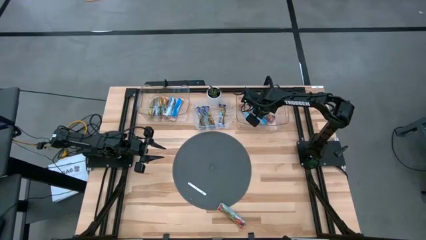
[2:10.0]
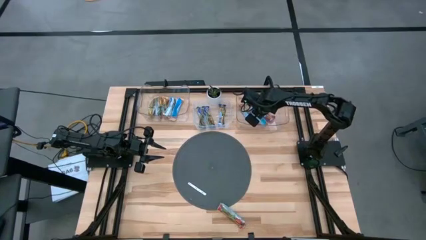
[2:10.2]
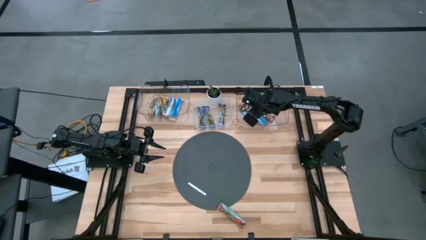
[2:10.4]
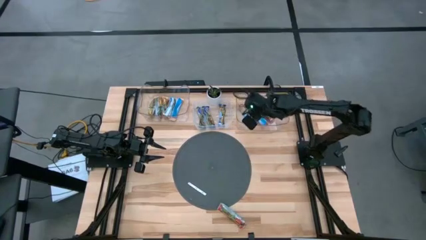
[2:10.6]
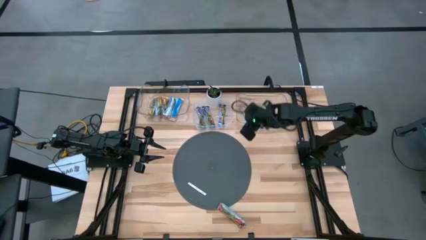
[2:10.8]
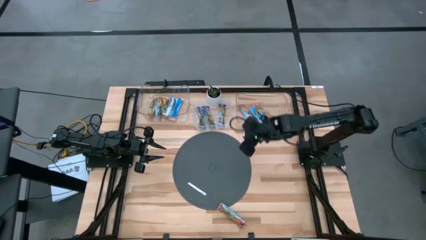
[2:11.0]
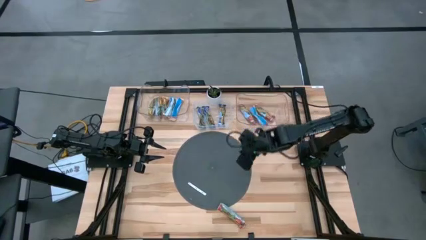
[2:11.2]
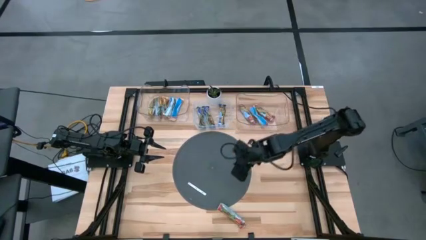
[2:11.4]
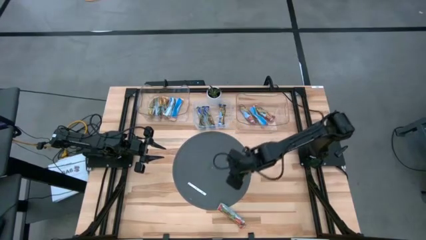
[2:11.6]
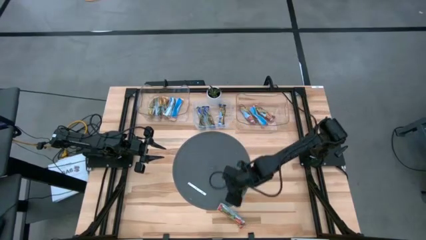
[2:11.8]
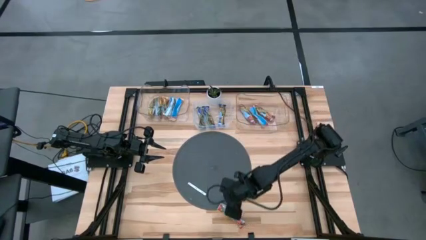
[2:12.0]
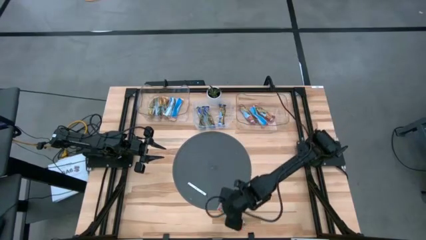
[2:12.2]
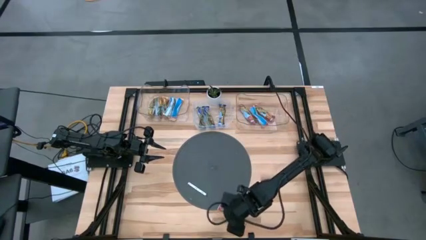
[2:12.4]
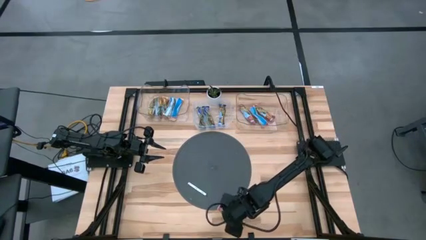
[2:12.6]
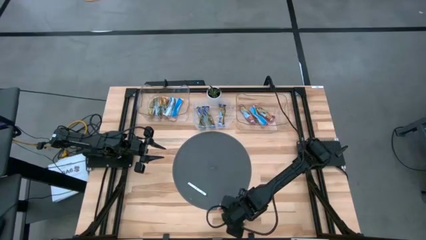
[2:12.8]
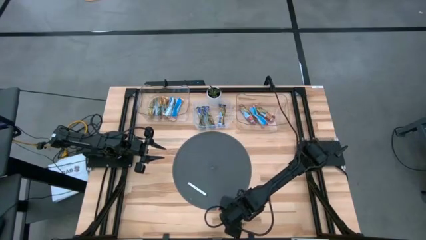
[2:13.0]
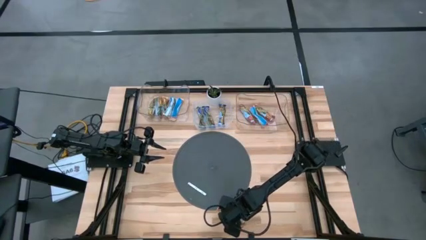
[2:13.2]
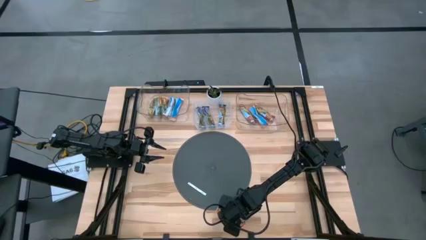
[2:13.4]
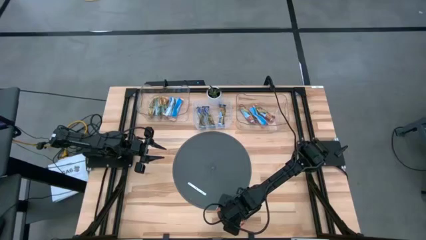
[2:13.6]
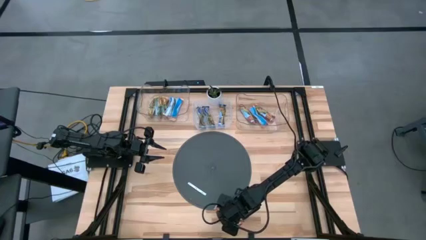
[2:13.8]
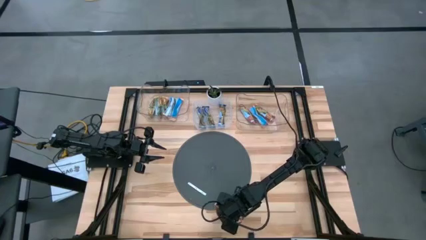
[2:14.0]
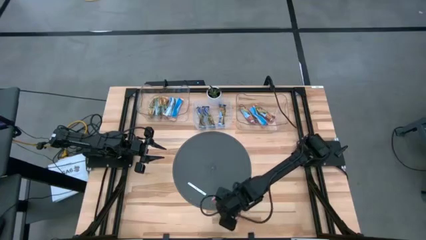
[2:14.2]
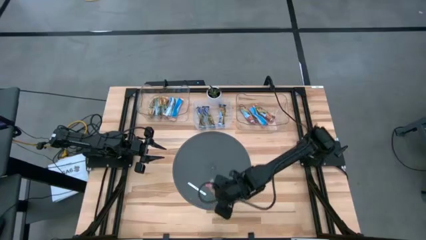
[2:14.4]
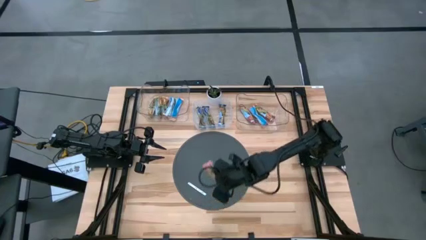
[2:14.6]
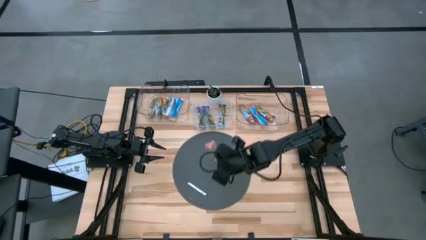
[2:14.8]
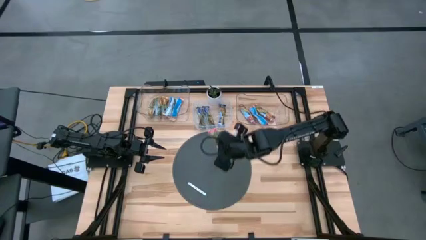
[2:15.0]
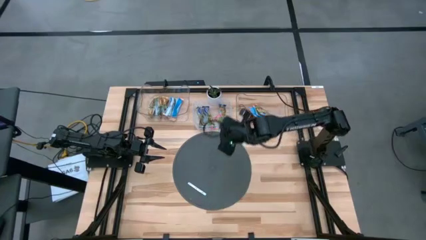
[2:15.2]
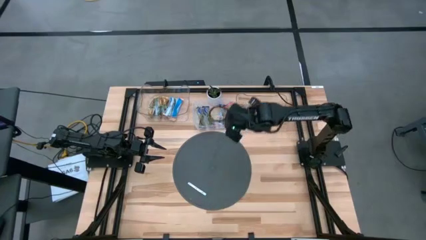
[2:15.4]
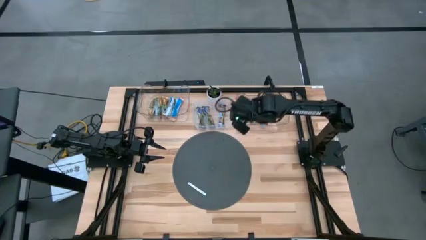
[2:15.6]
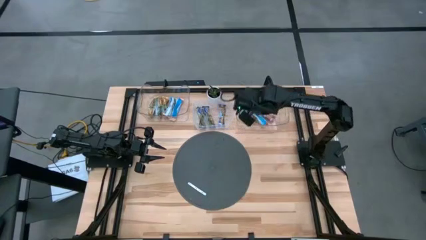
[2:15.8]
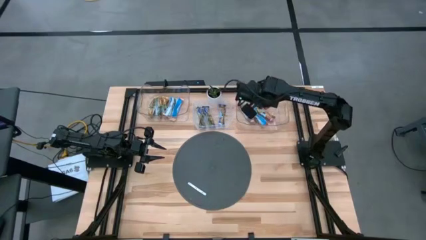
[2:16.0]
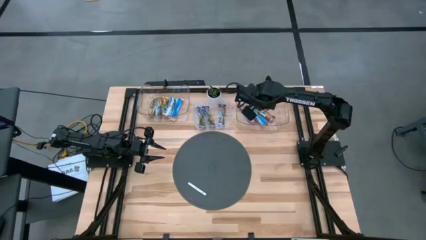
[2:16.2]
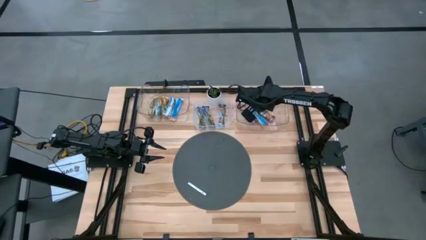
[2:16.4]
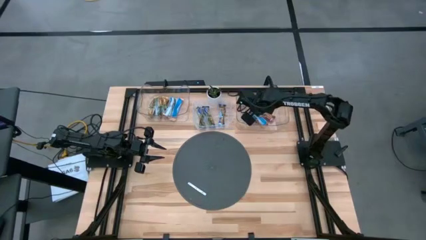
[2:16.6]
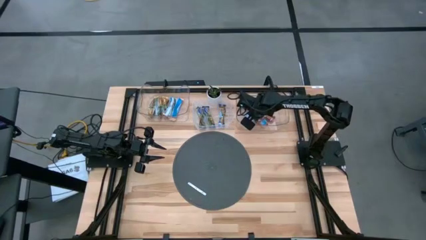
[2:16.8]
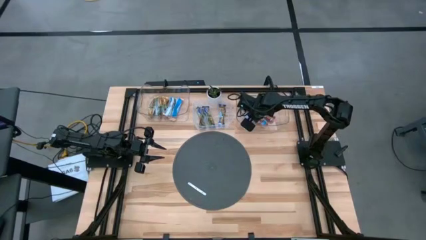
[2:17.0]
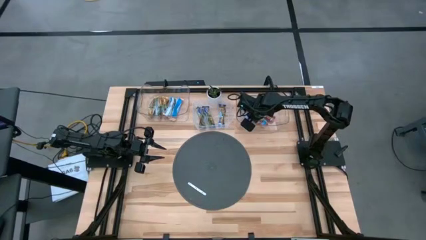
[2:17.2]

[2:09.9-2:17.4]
Task: Pick and place Granola Bars by type
Put the red granola bar into the right transparent bin

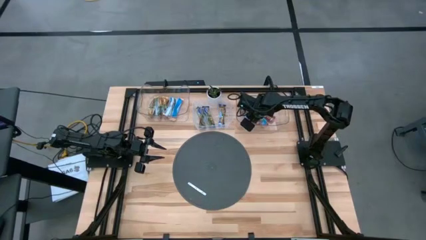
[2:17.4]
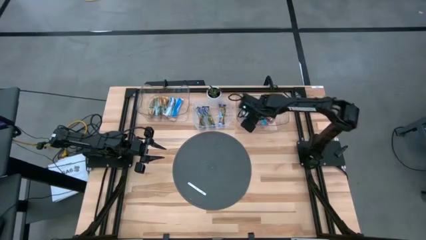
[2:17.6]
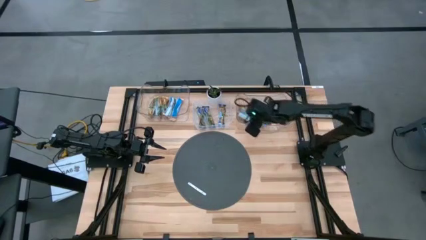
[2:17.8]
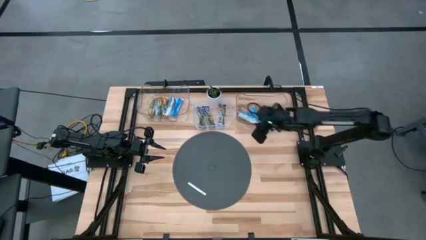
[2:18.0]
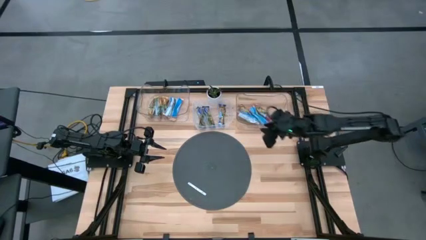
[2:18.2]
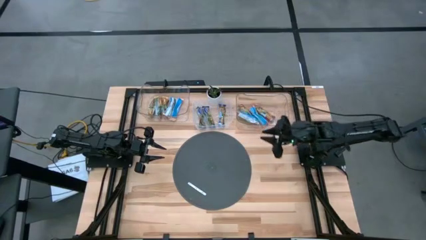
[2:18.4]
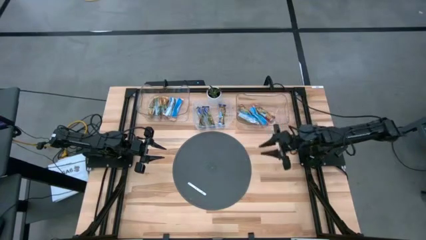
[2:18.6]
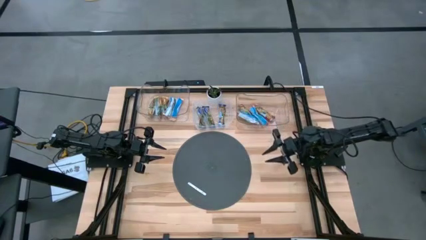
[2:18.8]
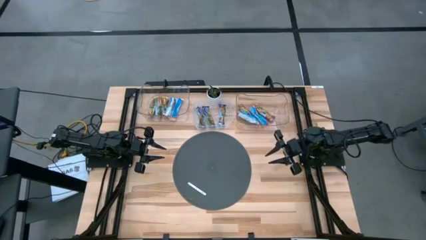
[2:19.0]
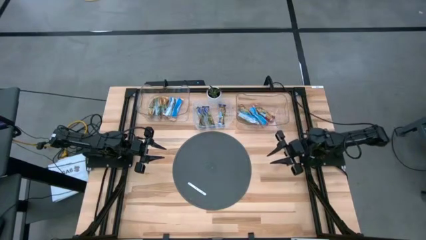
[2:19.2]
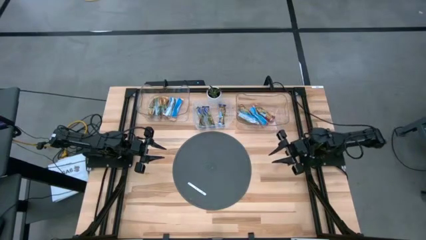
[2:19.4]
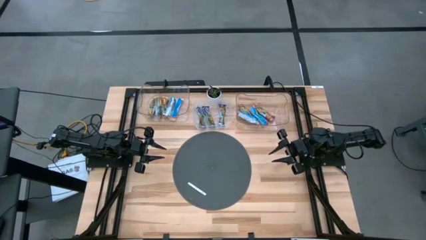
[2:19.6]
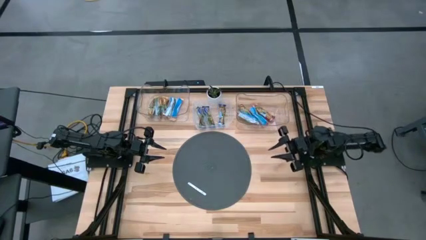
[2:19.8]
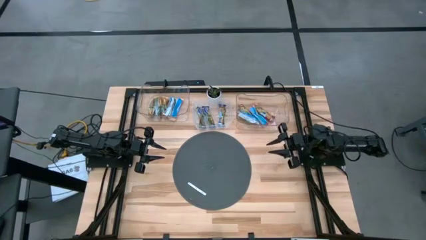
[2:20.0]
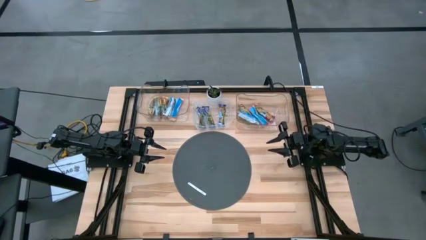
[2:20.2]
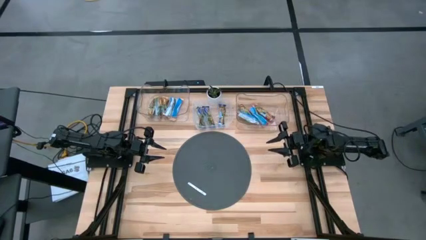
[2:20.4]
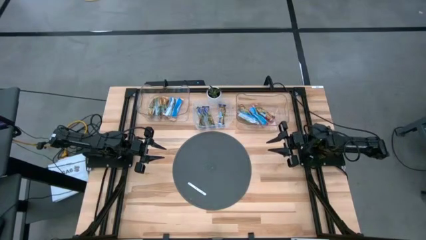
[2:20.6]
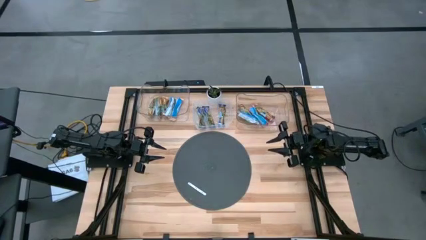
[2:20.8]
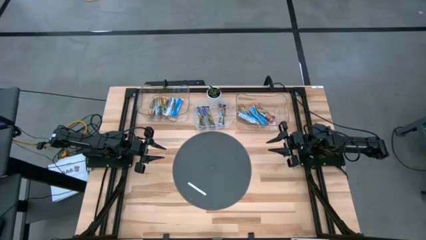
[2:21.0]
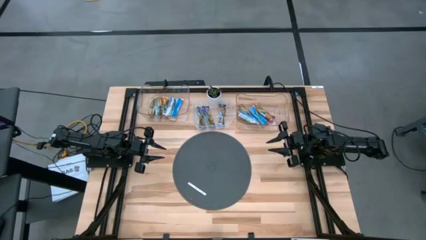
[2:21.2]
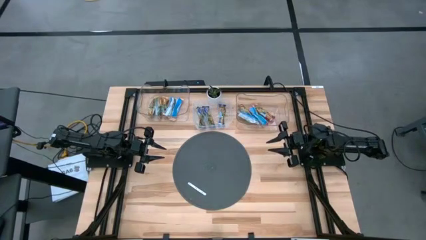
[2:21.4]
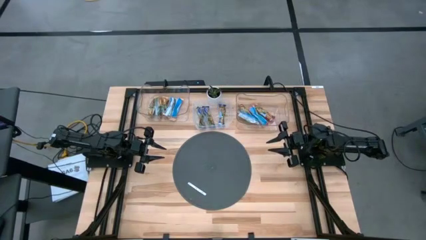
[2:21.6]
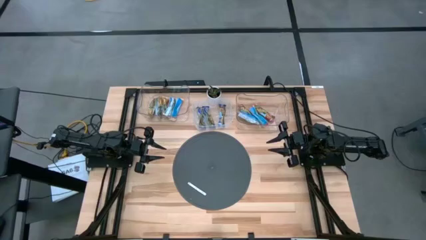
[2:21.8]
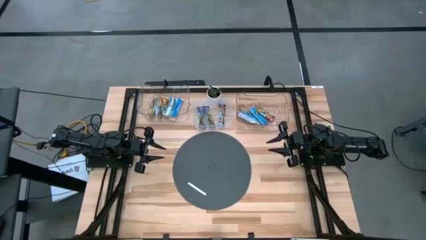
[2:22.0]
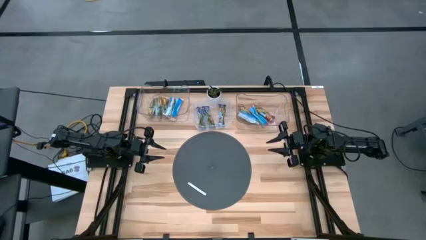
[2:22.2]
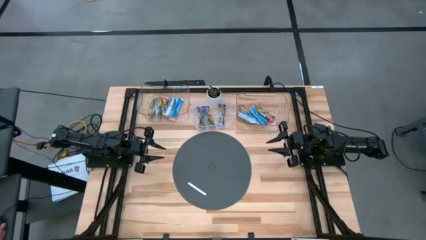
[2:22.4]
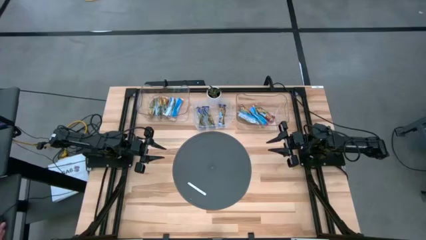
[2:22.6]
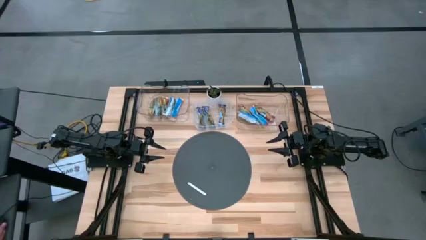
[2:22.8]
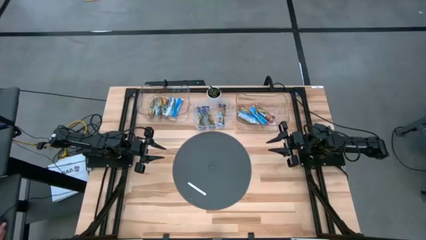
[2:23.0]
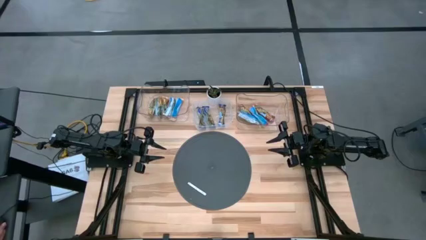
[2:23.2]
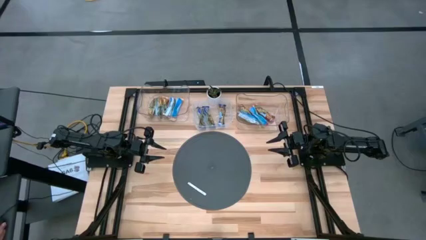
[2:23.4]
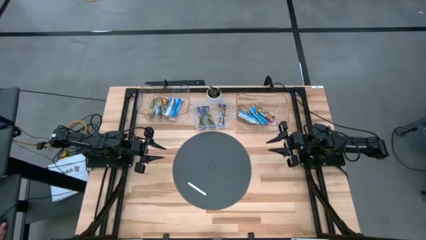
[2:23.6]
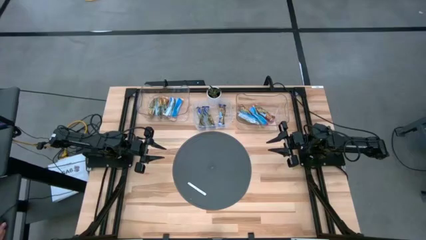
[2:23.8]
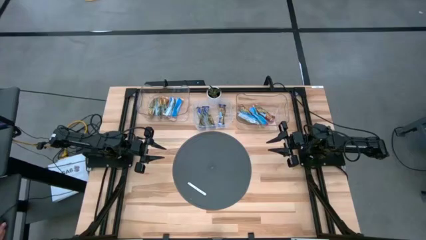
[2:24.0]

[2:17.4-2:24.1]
Return to Home Position
